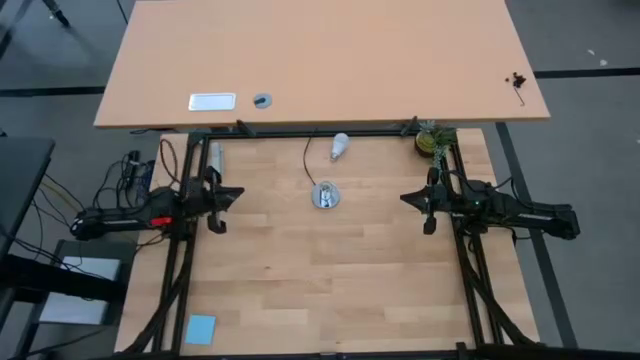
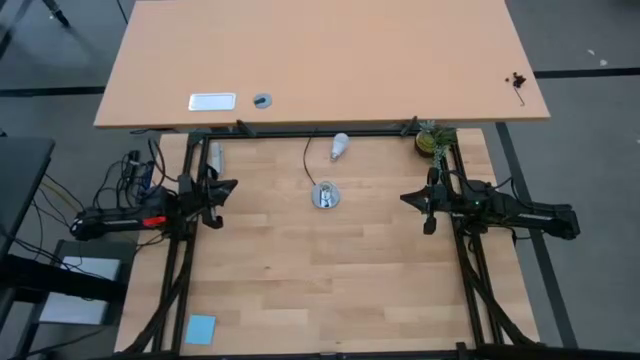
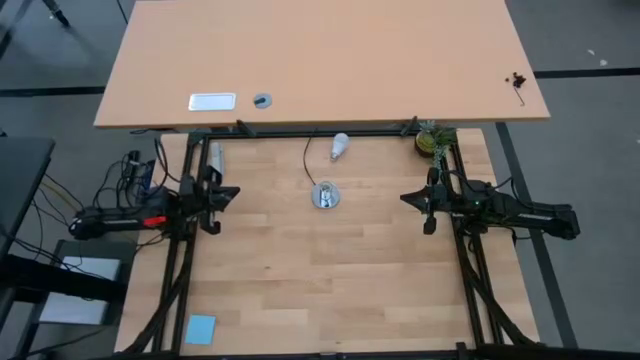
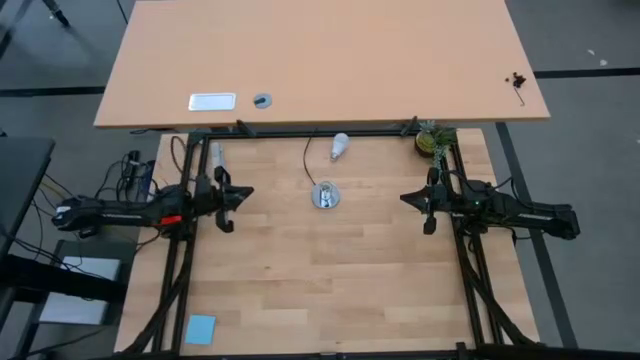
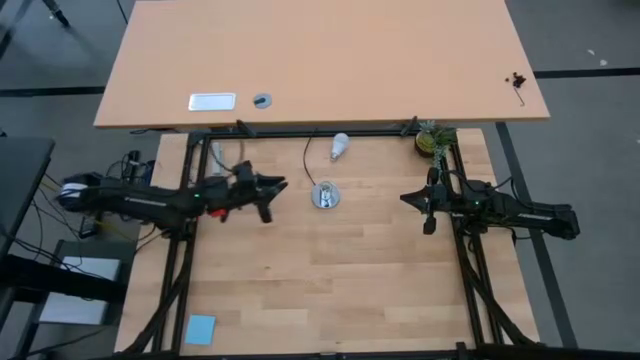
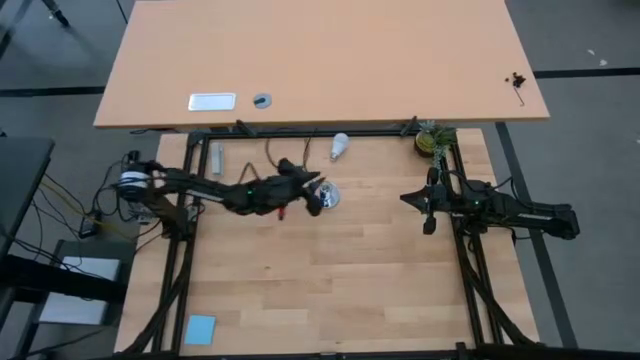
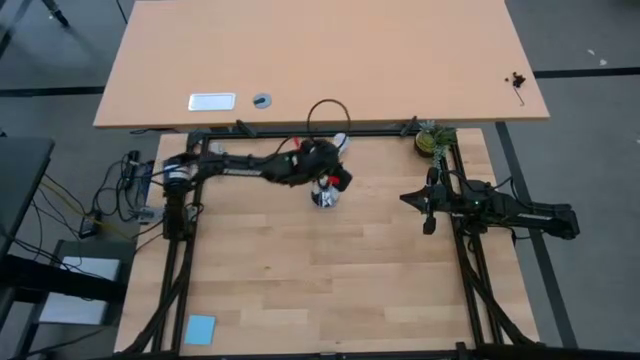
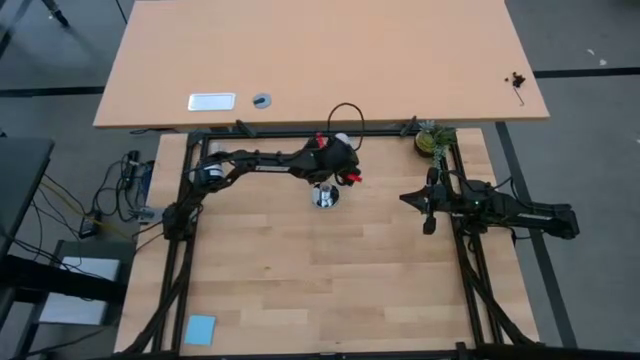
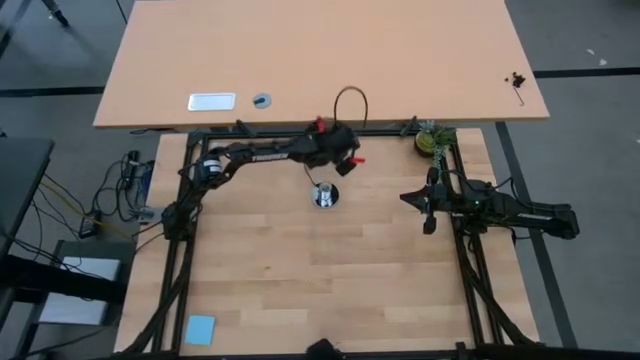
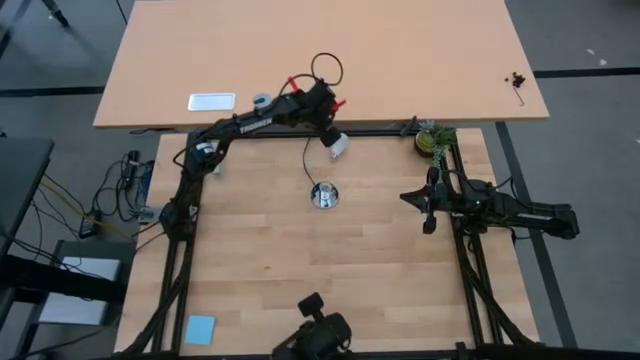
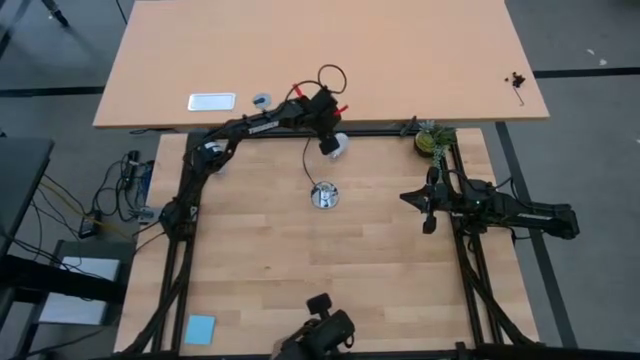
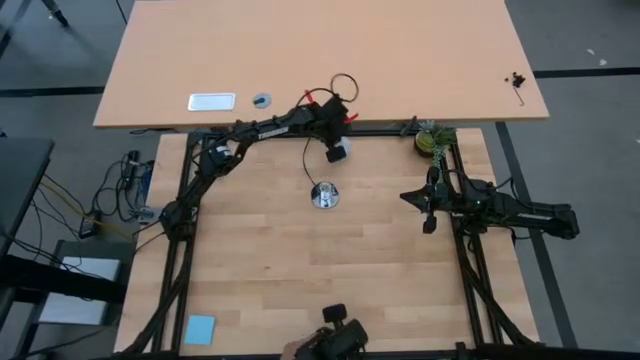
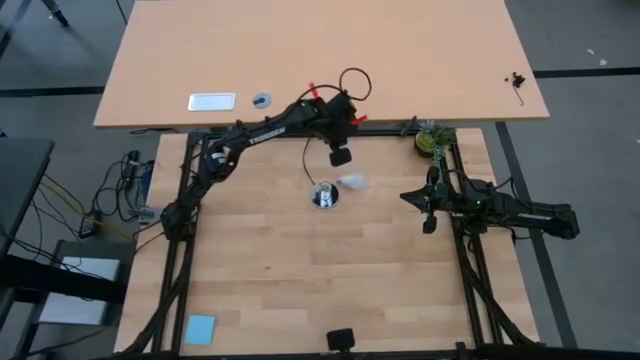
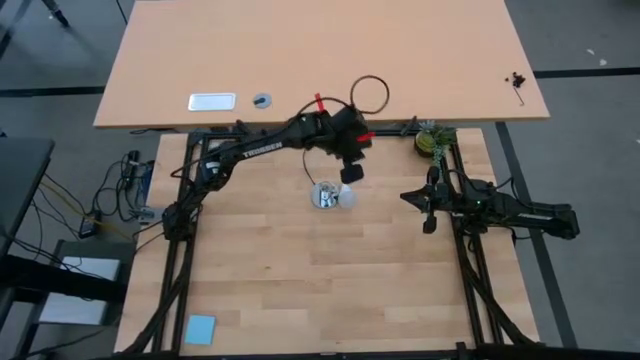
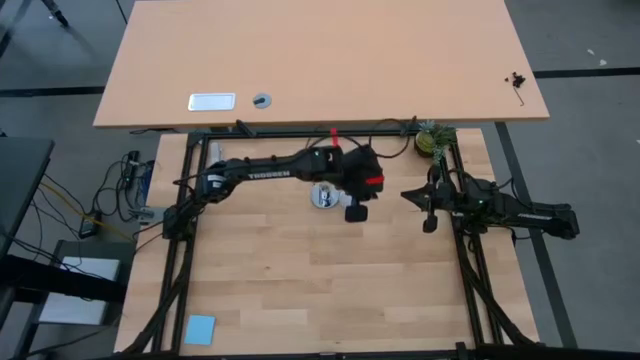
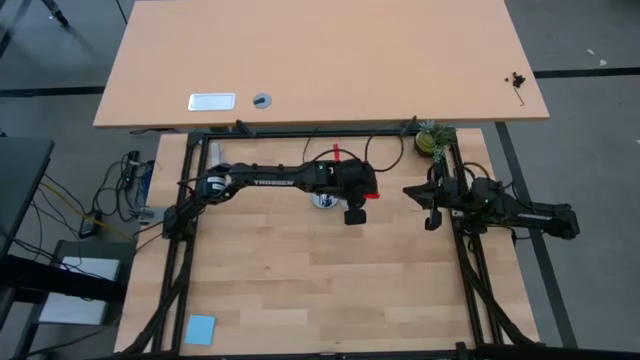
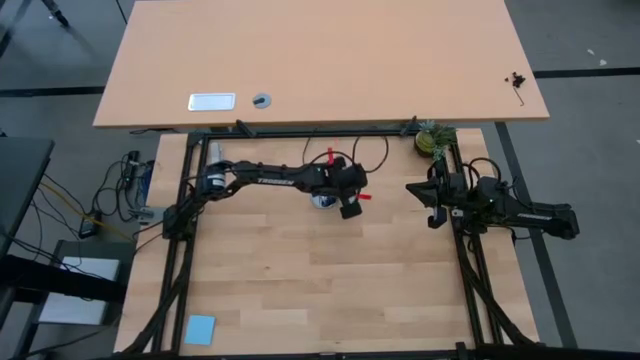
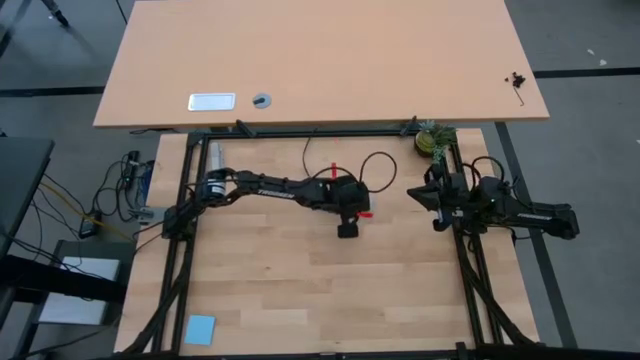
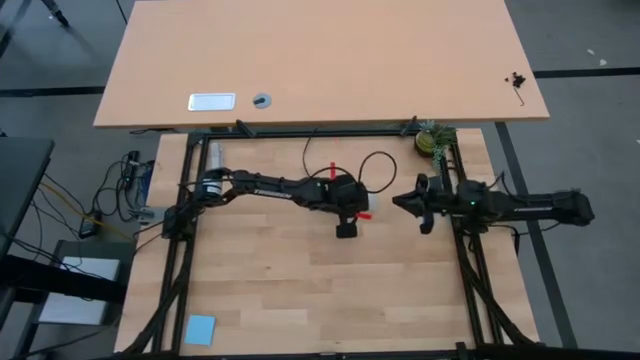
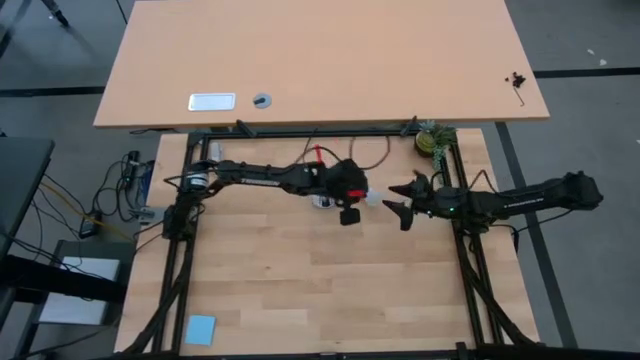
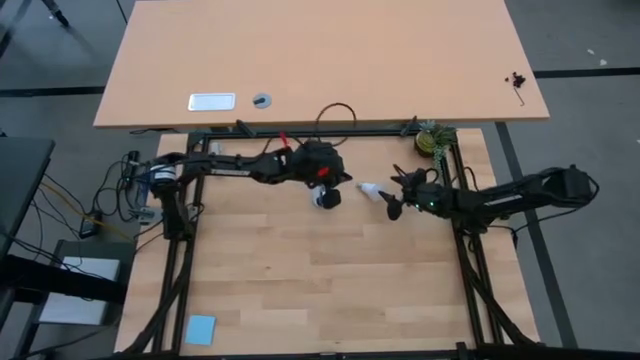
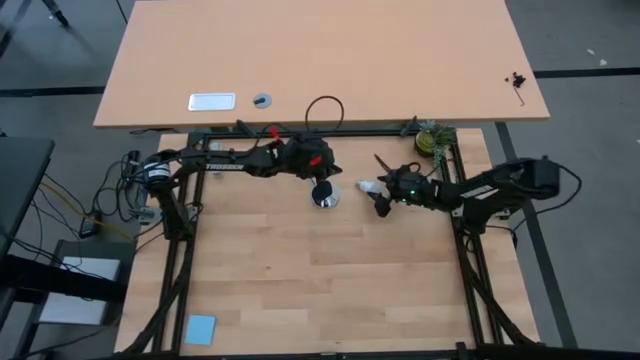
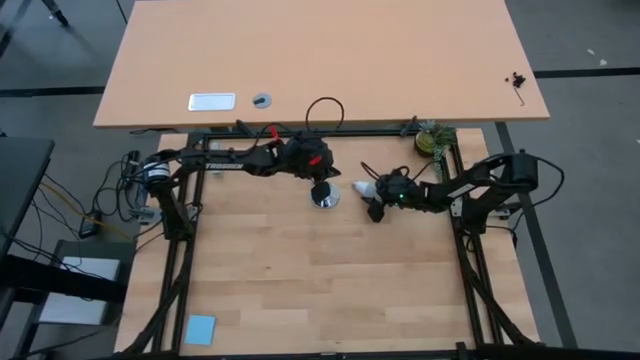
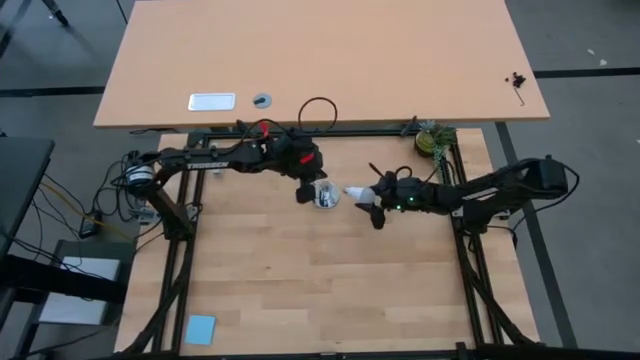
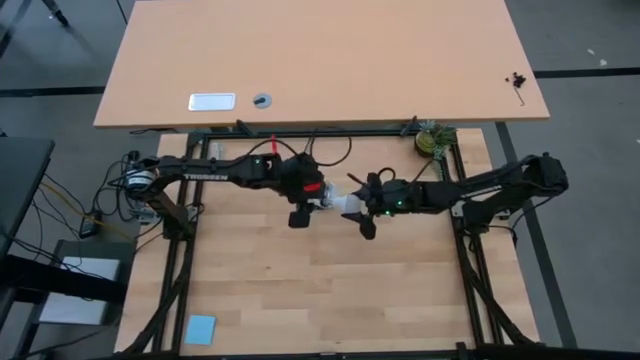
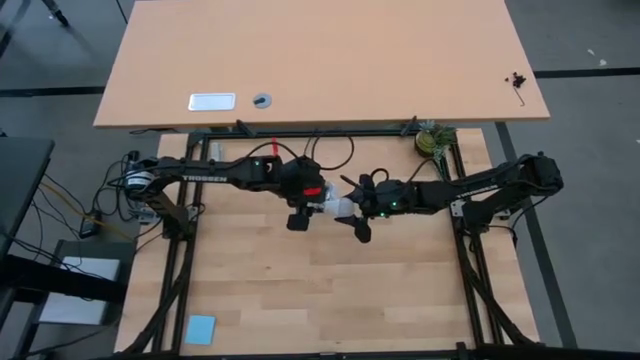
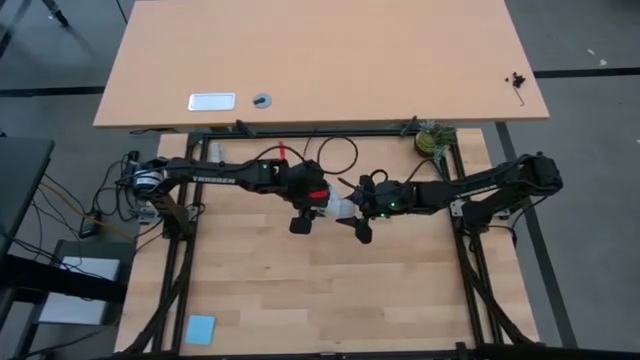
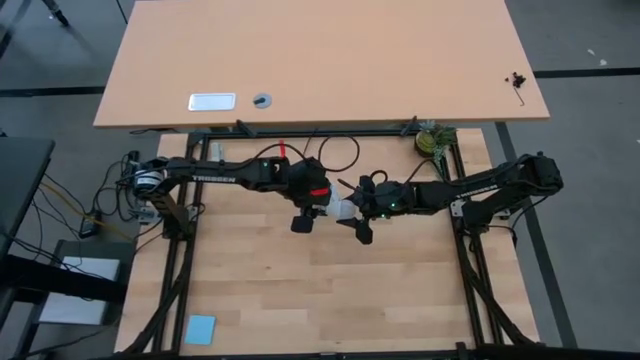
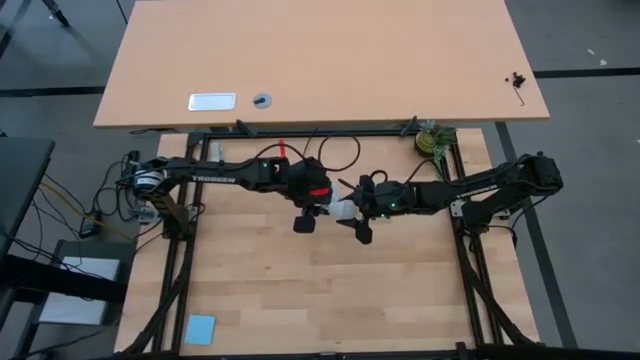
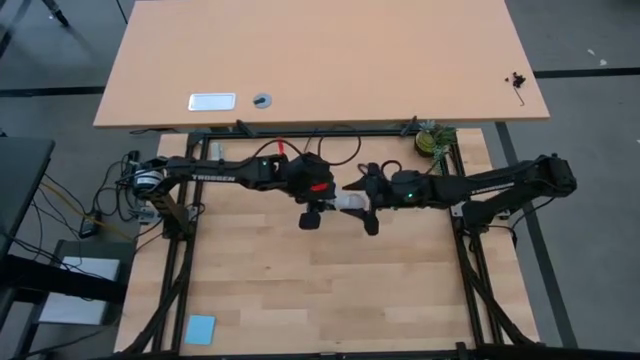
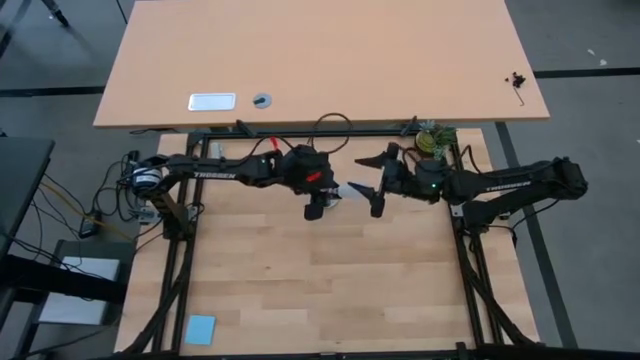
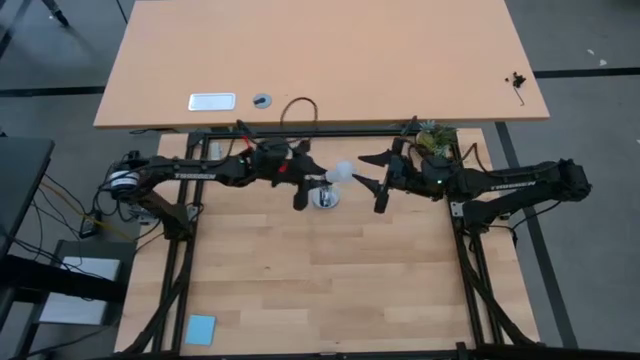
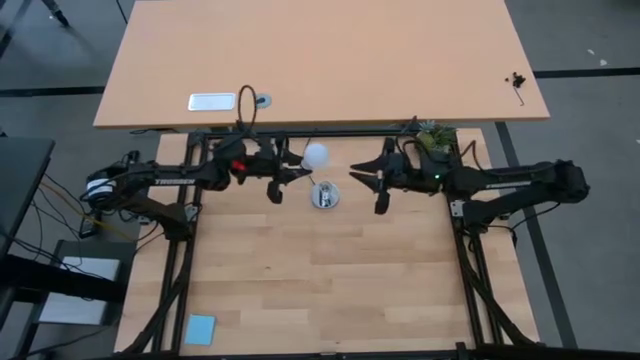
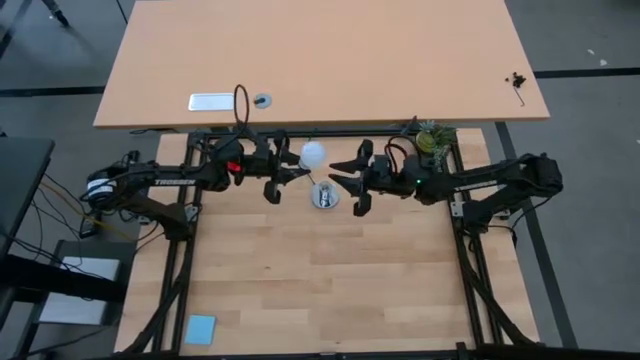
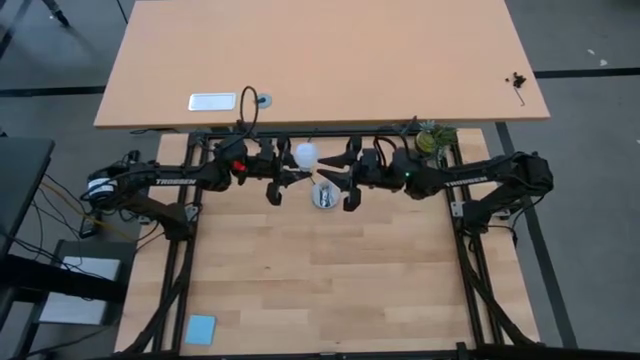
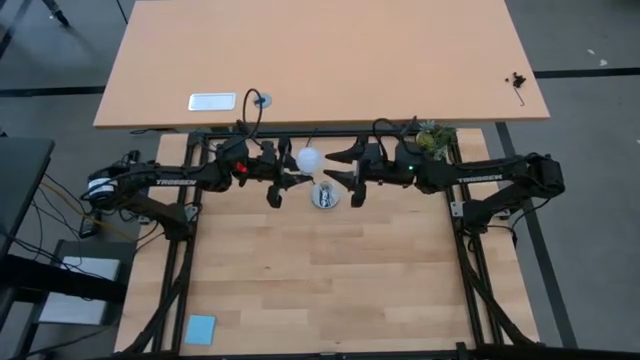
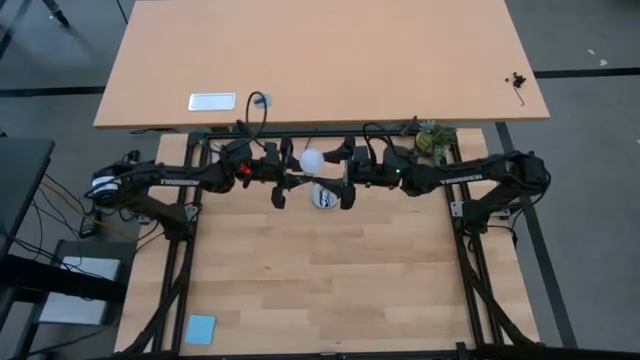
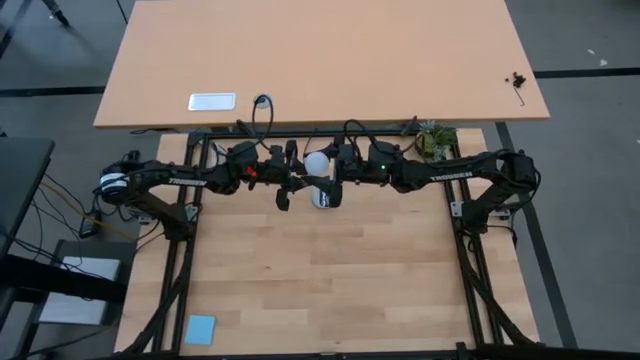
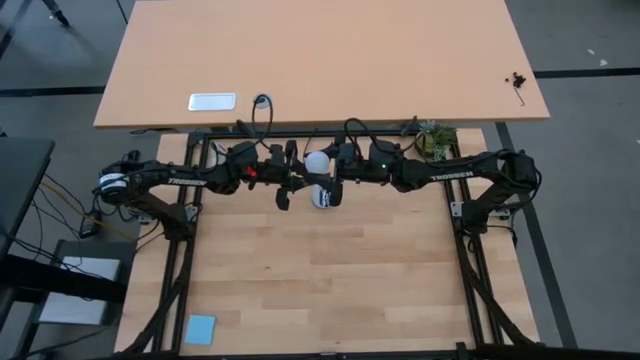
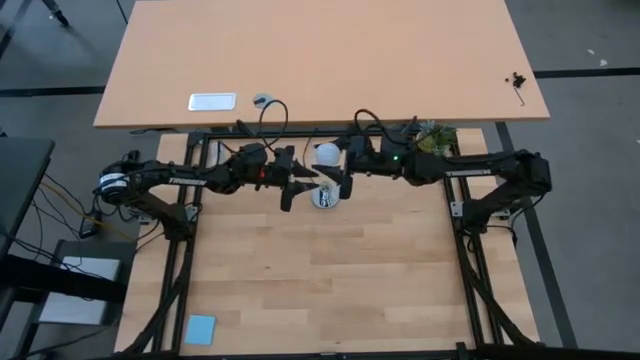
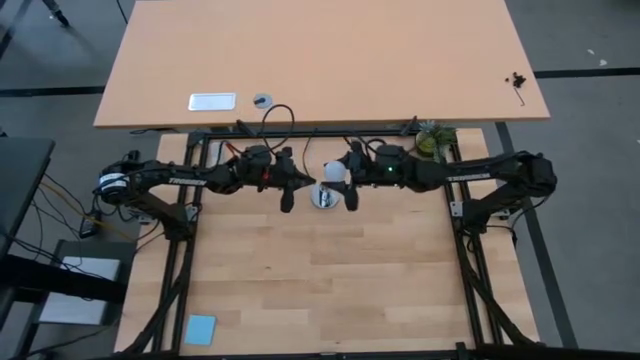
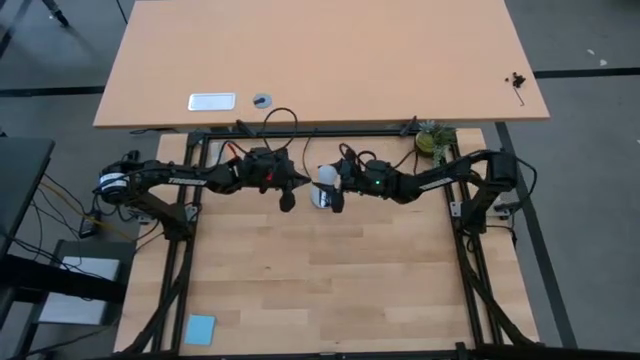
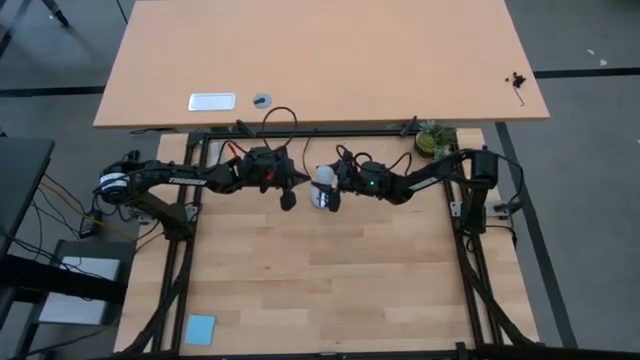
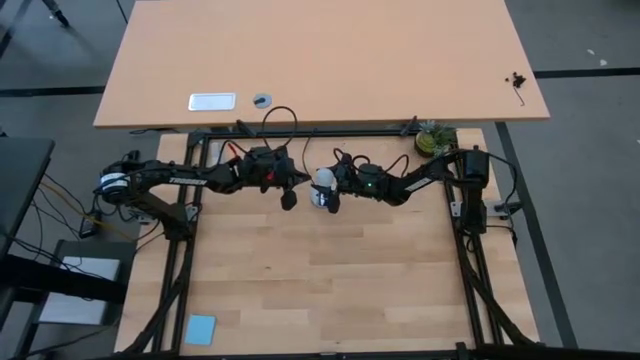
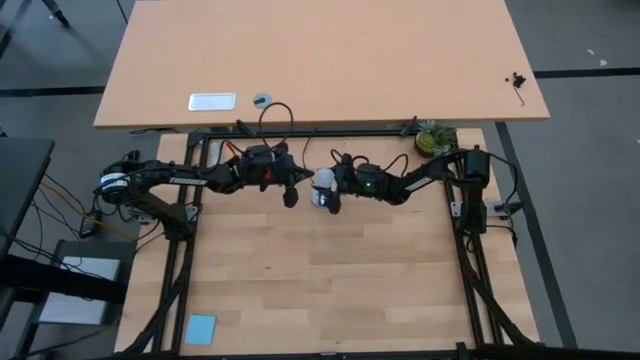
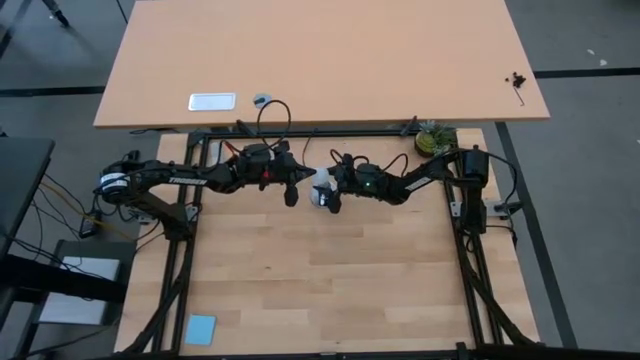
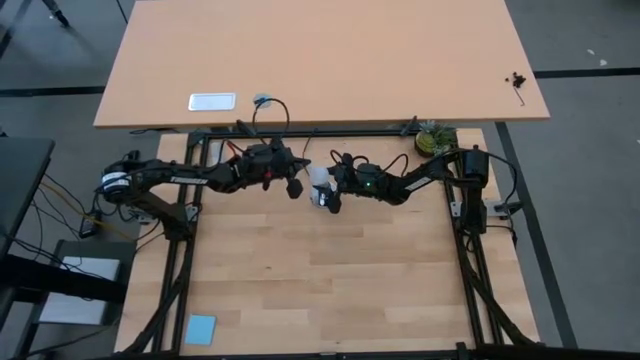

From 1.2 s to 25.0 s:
Task: Screw lightbulb
Insert the lightbulb into the lamp
